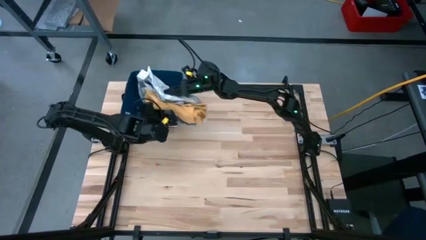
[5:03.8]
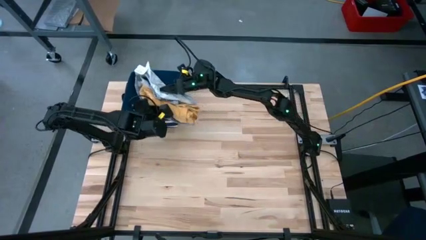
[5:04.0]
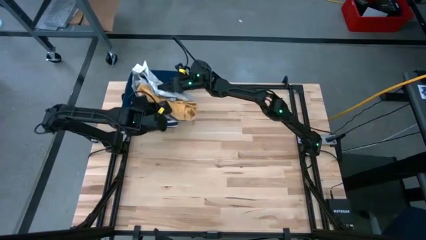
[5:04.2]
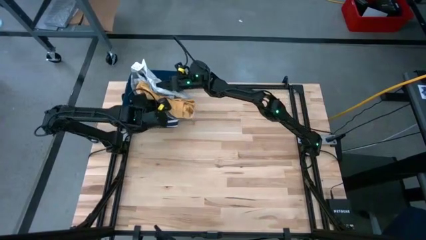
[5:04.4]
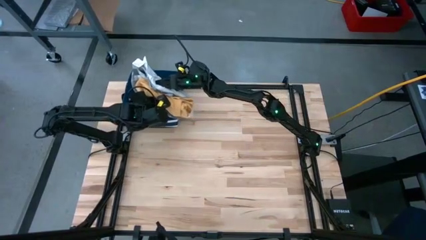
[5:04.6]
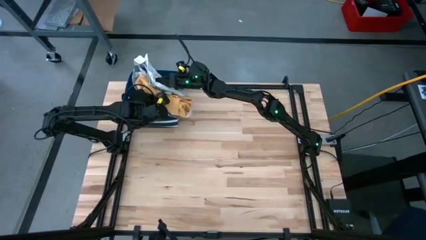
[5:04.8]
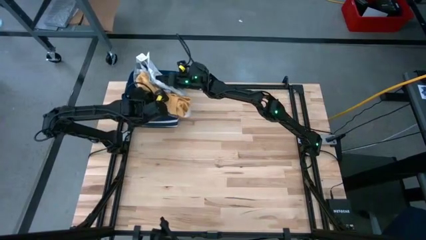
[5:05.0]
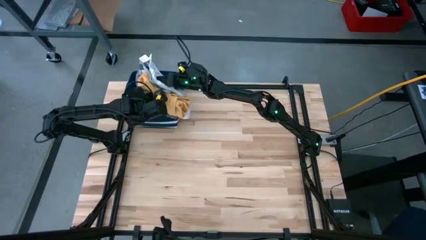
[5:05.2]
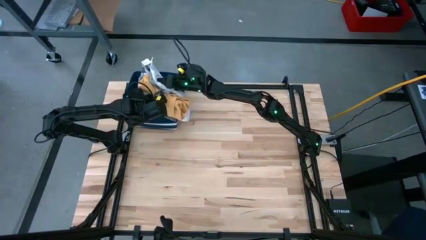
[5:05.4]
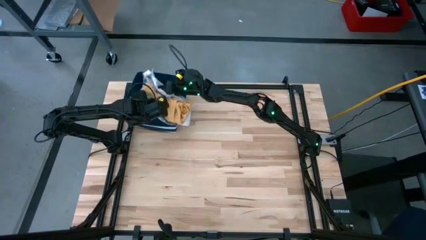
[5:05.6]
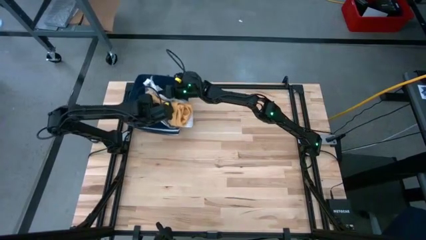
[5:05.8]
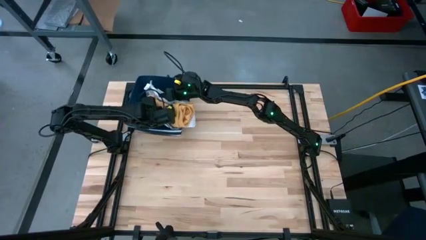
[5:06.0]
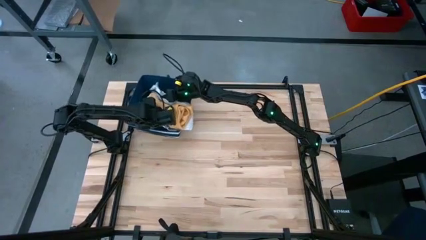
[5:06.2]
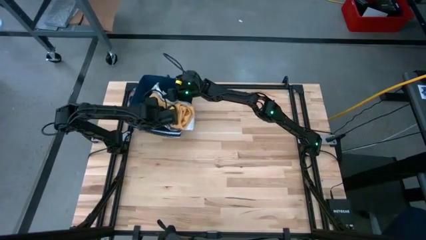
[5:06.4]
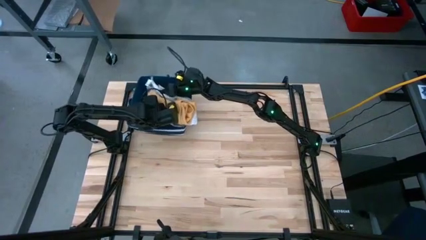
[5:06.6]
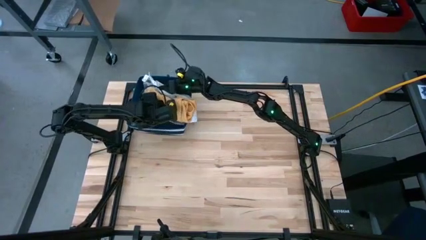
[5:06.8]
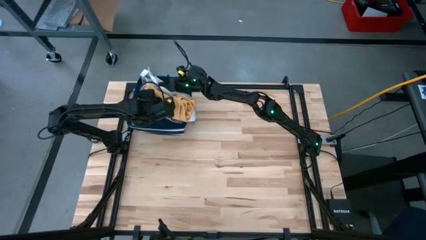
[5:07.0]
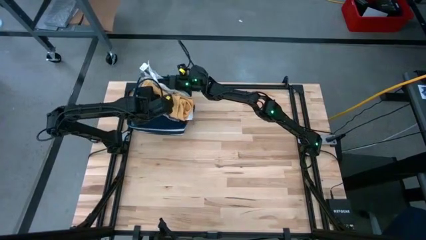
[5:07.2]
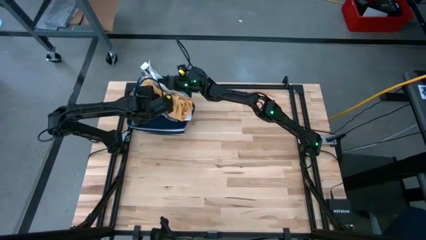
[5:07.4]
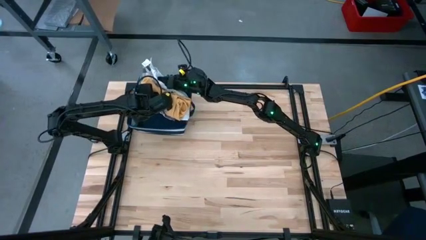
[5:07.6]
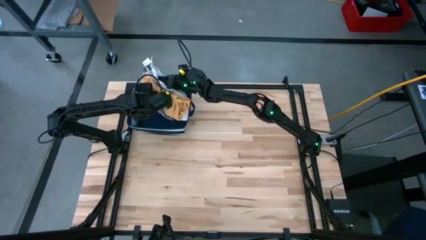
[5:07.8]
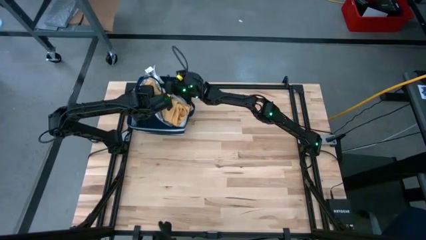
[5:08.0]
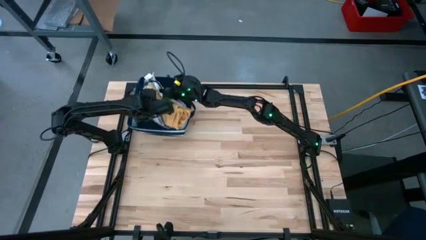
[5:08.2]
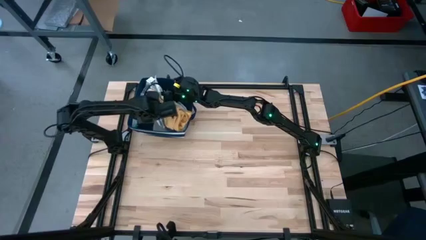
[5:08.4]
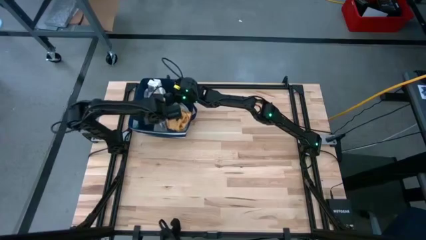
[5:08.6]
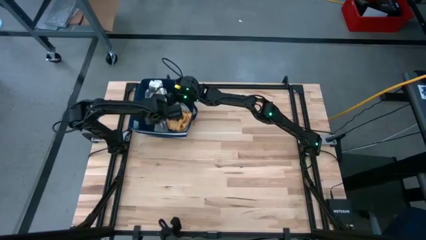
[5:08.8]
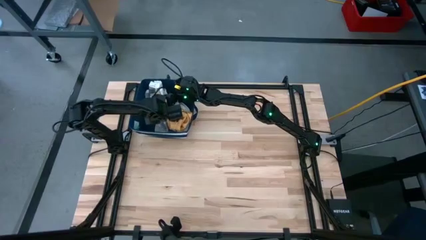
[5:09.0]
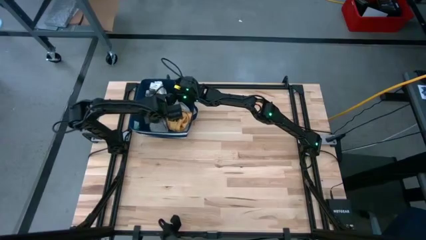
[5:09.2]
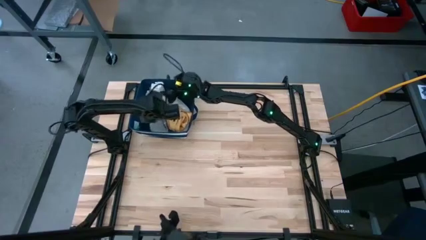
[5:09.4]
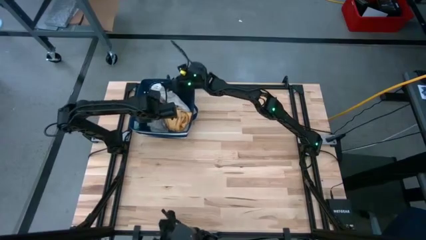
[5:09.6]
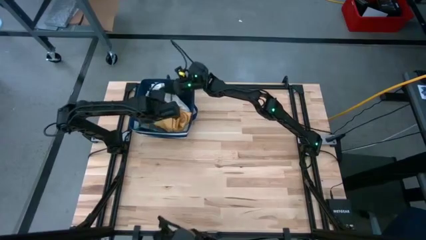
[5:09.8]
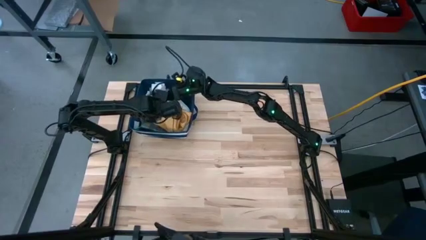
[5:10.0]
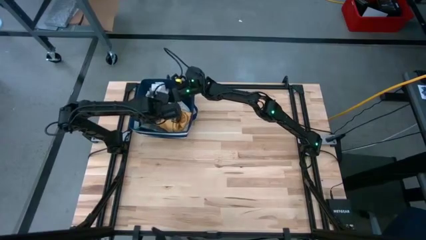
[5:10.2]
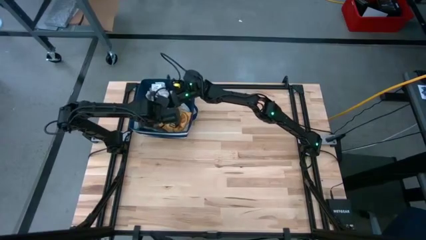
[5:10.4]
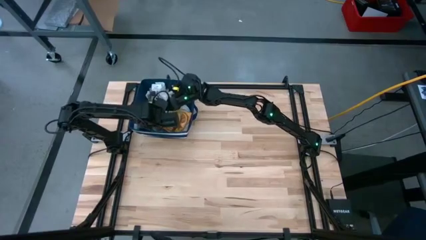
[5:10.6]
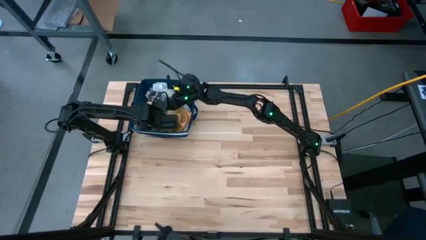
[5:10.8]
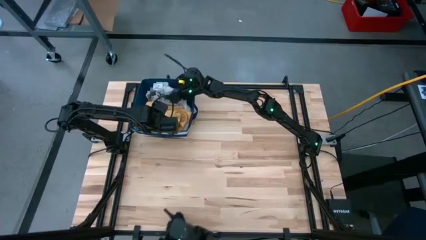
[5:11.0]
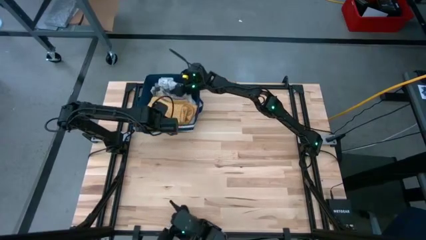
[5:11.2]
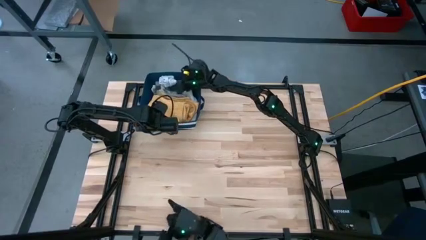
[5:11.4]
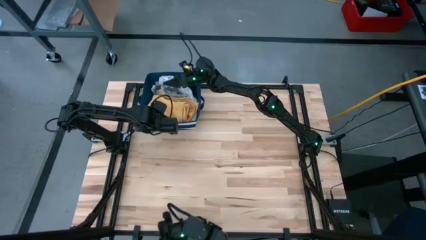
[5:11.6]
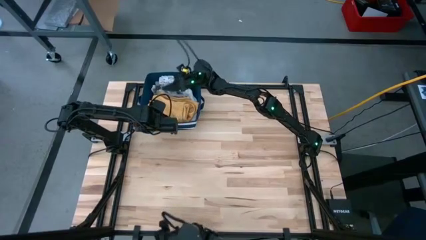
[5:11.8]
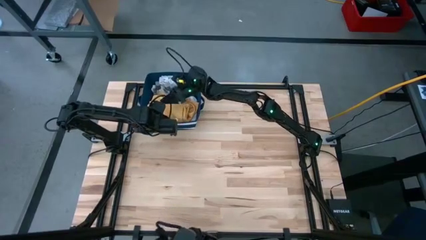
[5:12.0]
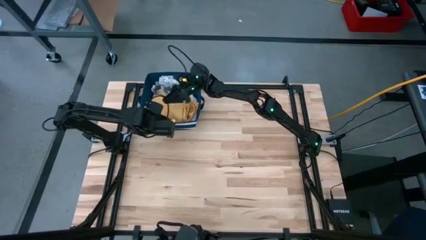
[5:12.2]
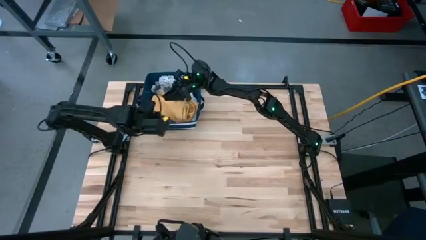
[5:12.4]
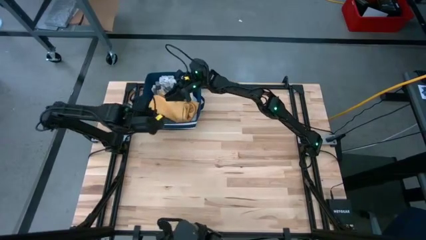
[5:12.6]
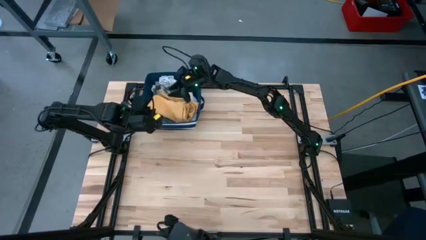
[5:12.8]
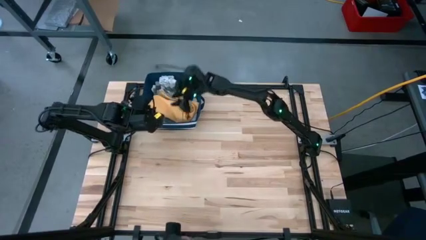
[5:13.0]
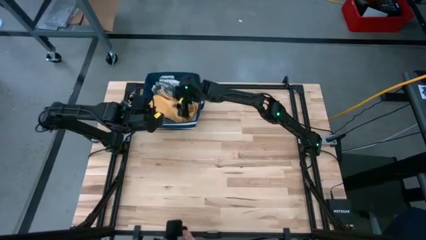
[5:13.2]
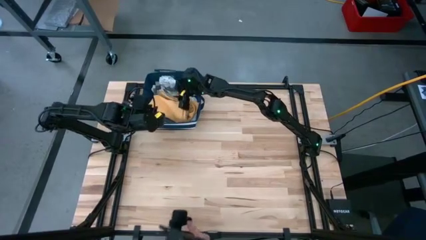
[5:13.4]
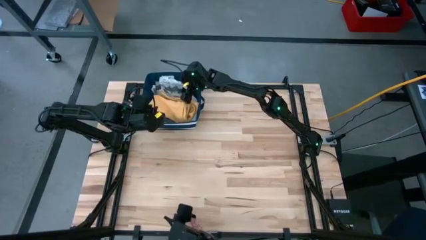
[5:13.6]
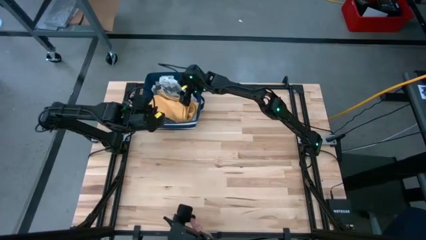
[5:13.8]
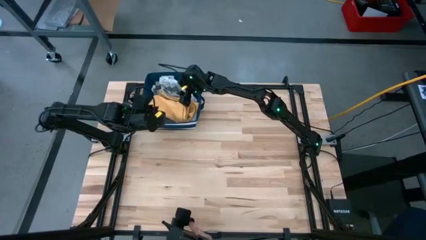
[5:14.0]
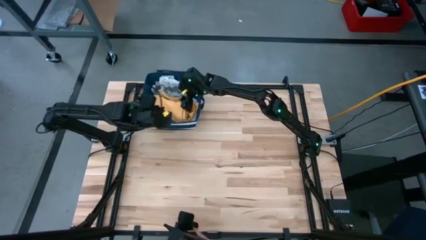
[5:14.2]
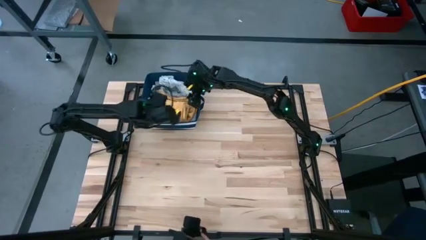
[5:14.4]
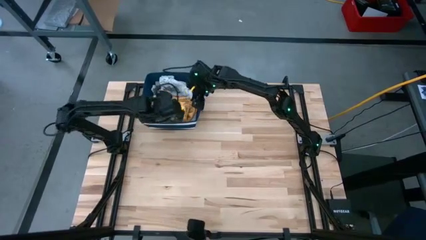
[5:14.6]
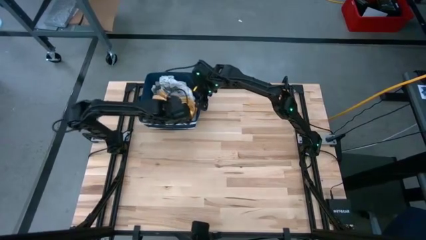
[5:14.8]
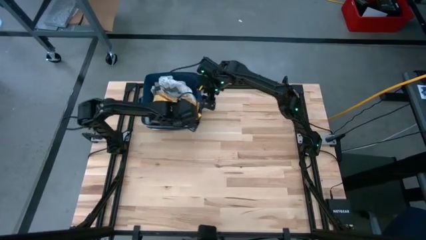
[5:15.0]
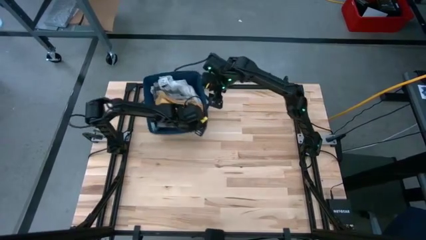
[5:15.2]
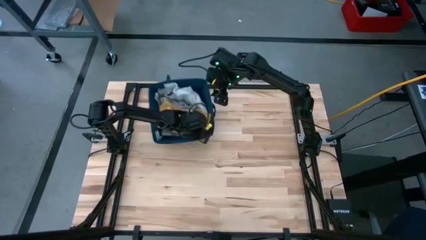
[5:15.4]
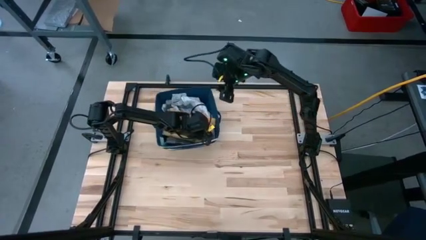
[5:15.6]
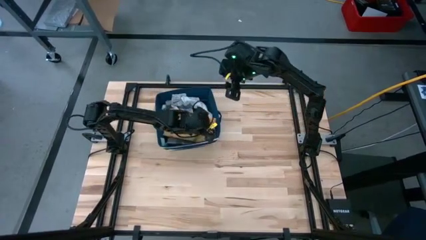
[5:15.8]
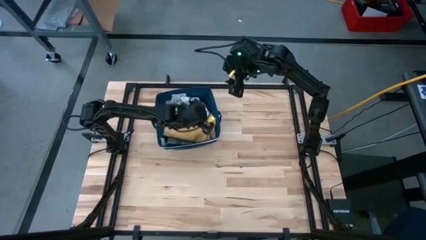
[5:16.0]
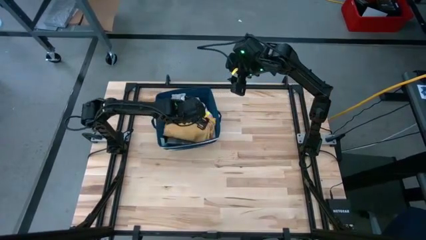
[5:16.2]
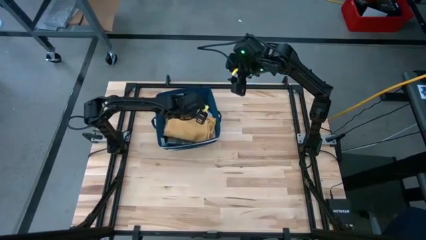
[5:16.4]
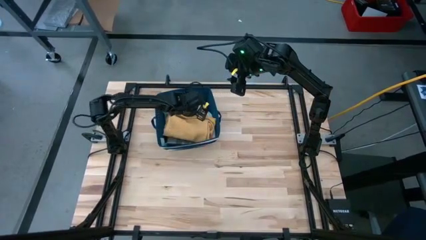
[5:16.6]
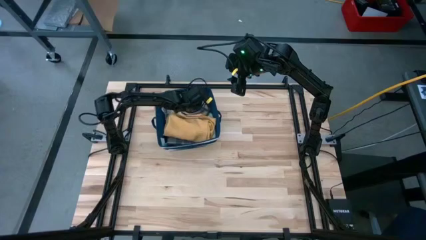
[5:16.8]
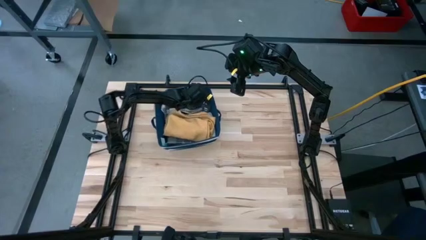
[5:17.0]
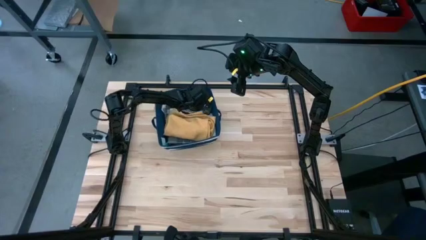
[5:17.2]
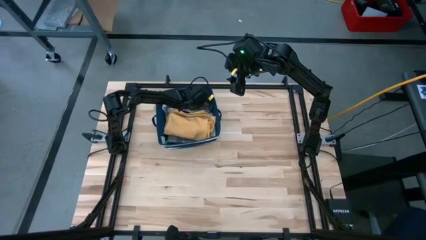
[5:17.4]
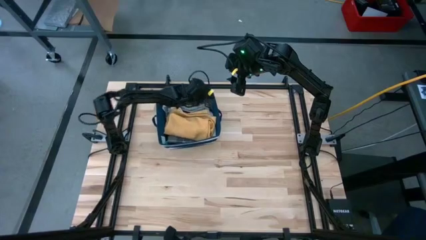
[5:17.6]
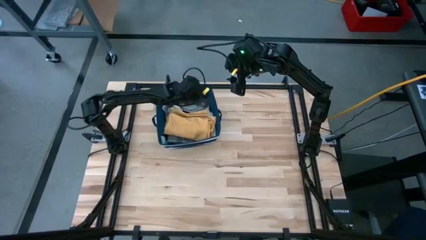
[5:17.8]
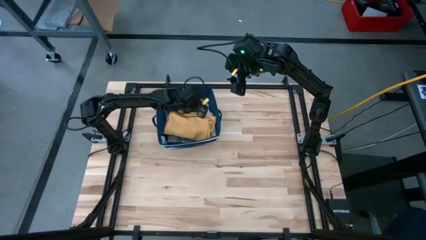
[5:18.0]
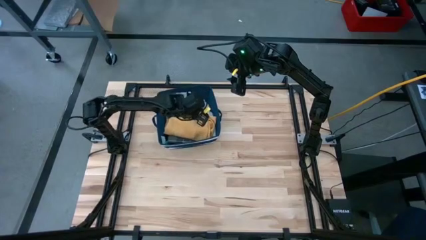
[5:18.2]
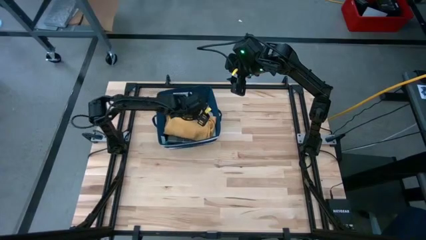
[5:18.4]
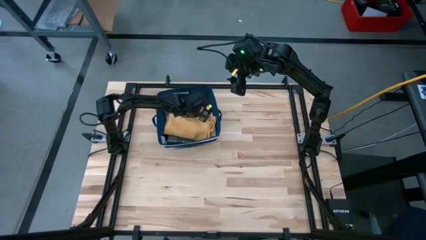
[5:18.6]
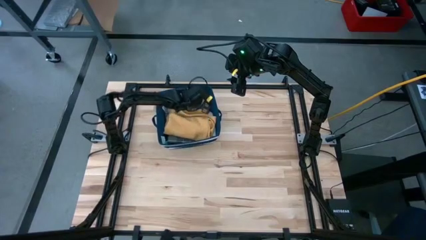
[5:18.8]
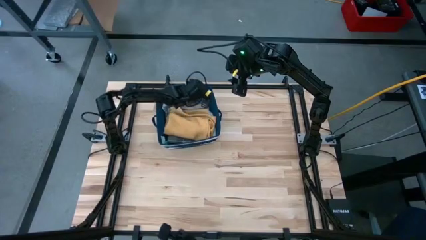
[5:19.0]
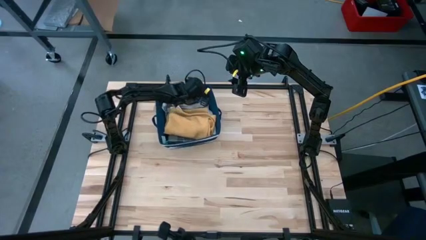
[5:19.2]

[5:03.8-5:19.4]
Task: Fold towel
Put the stacked folded towels into the laundry organizer
